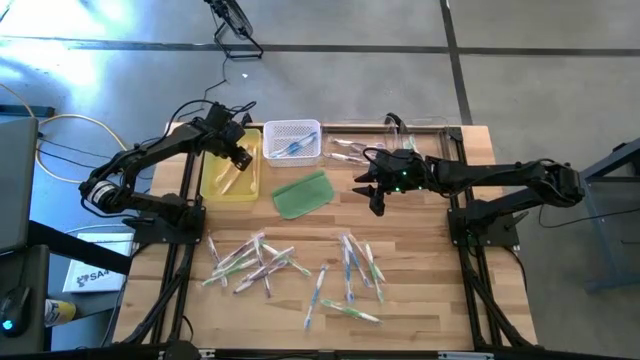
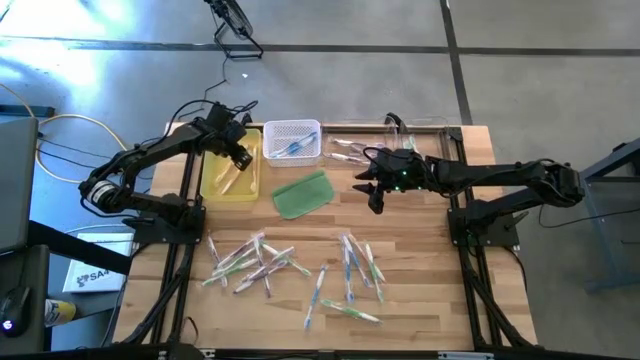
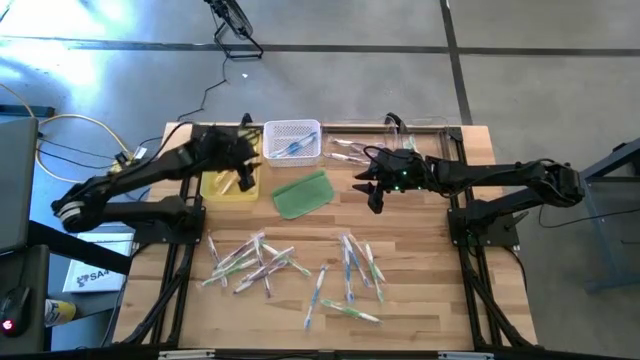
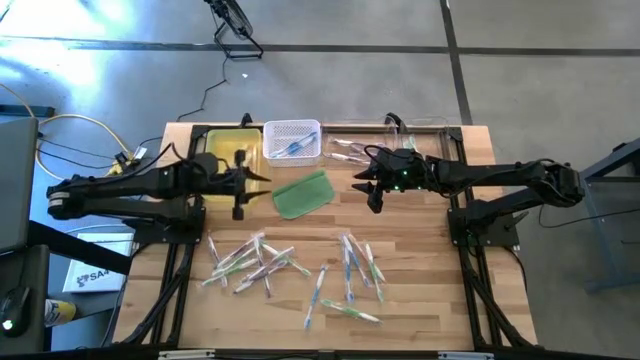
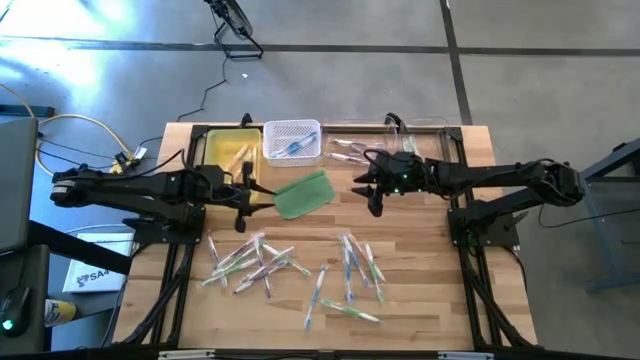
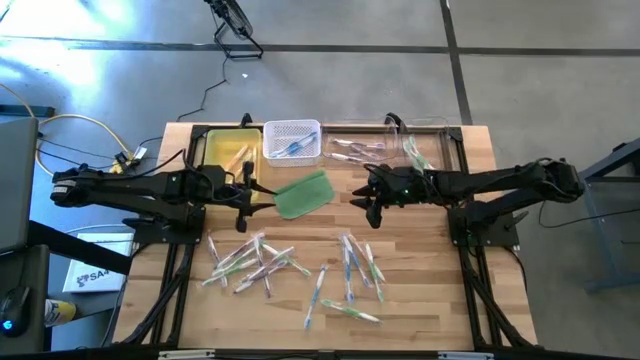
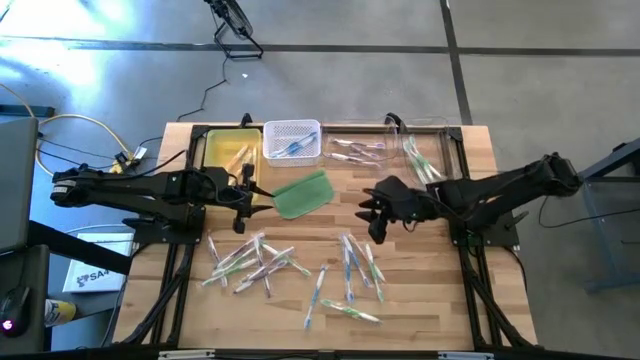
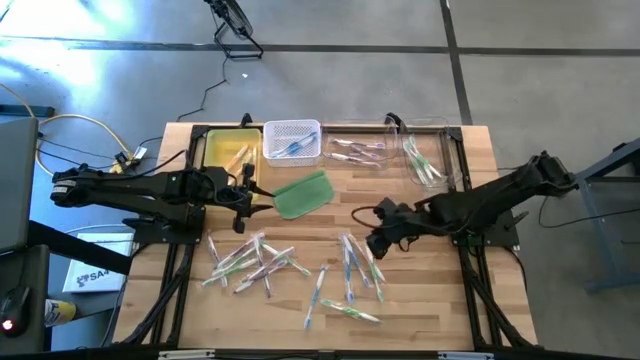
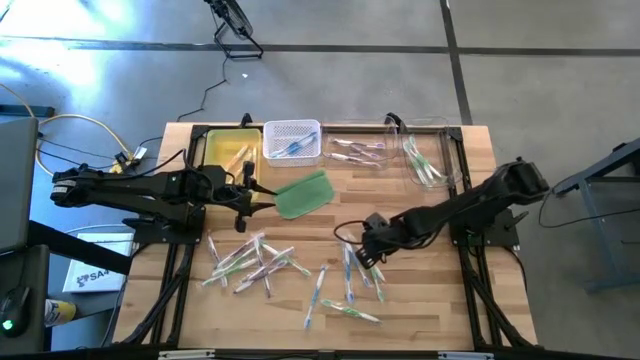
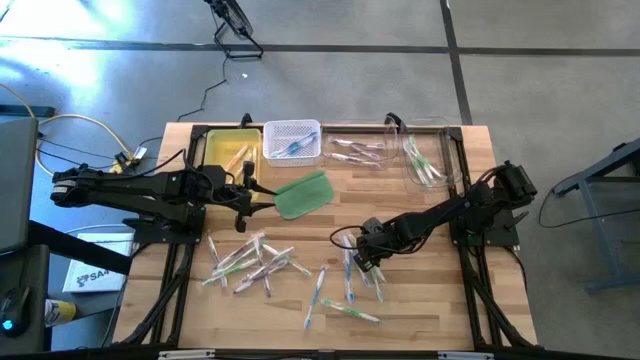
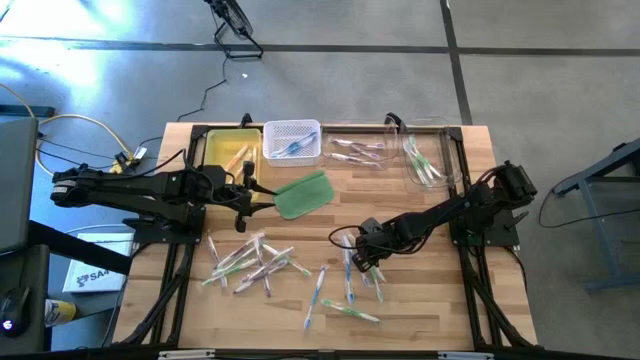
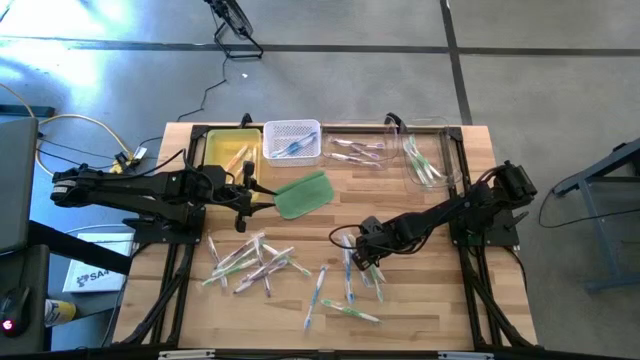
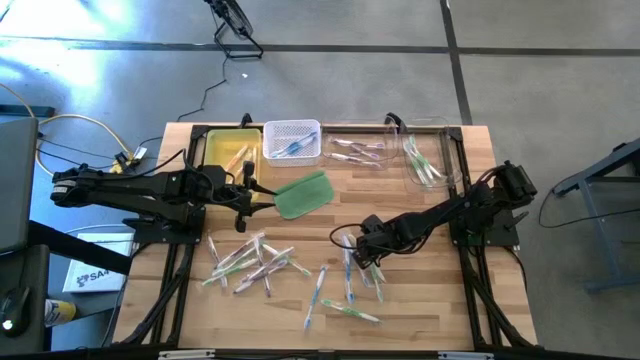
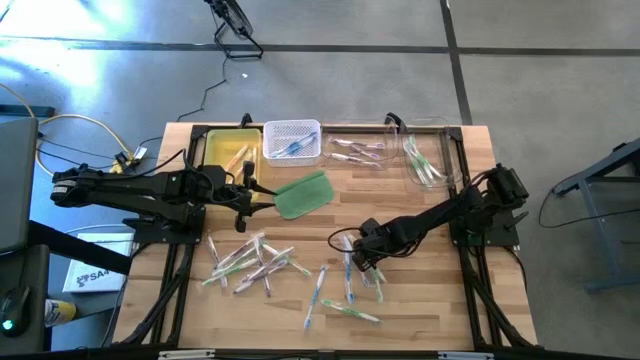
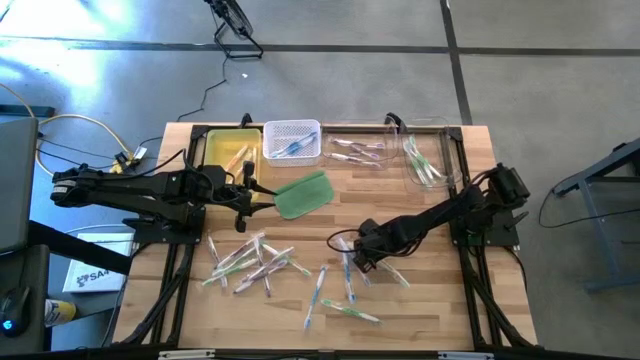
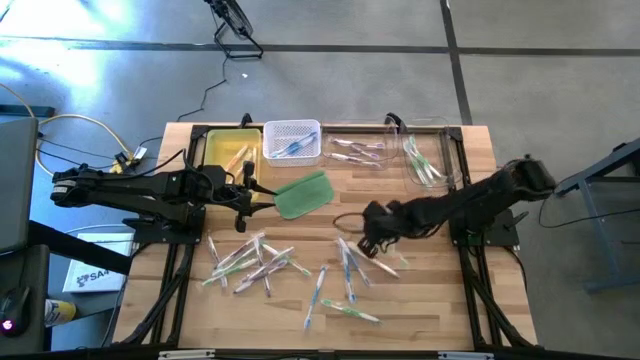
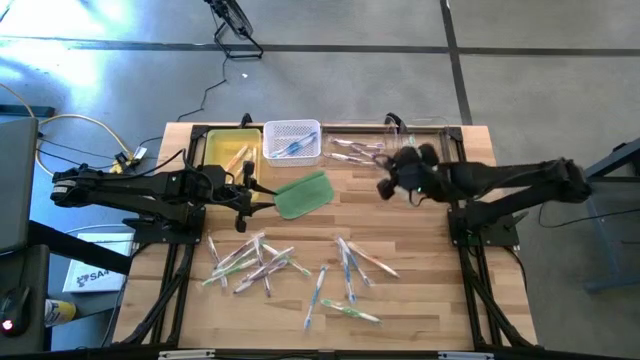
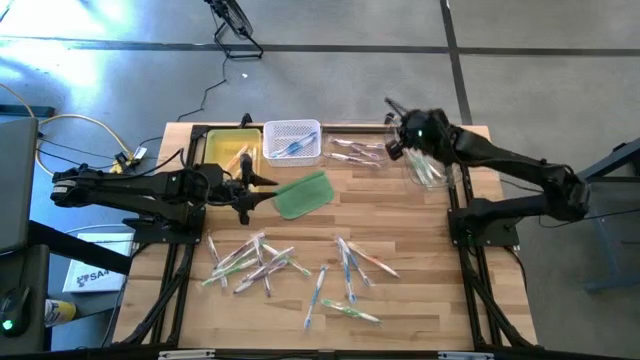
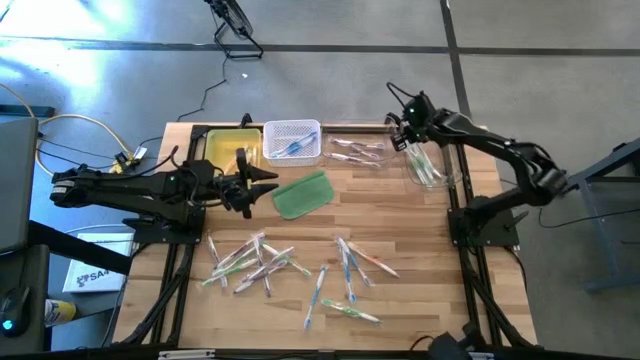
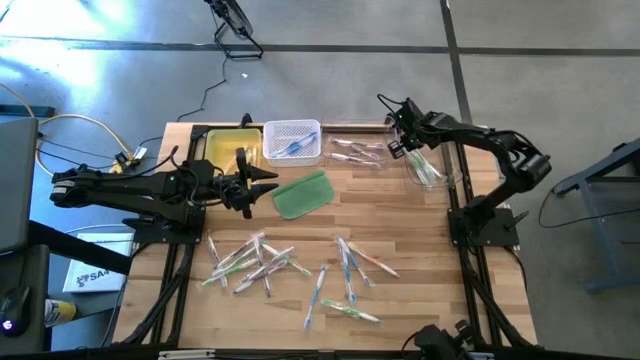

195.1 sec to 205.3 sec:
Task: Pick & Place Toothbrushes
Put the green toothbrush into the right transparent bin

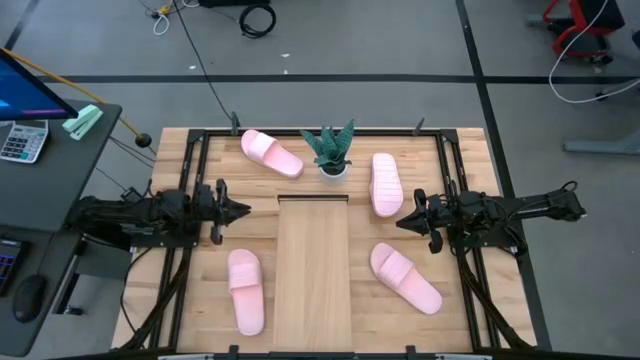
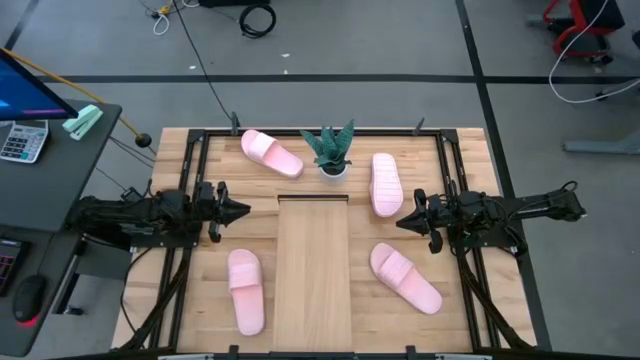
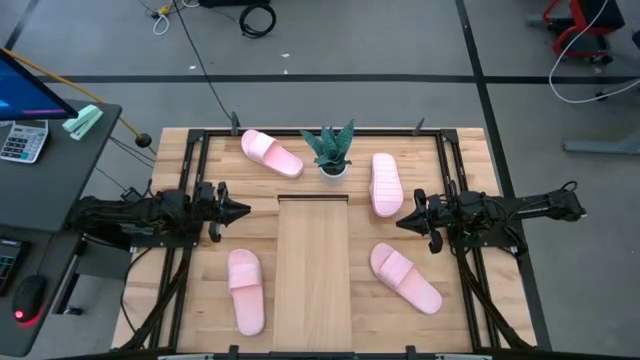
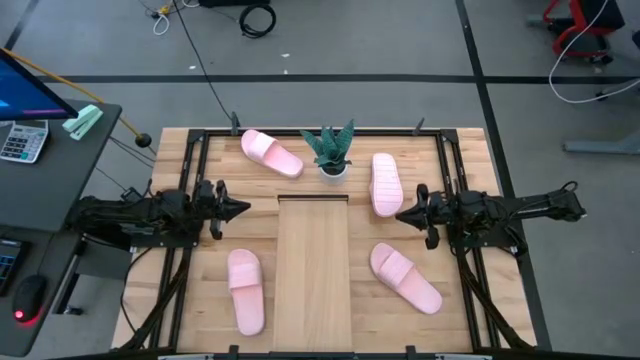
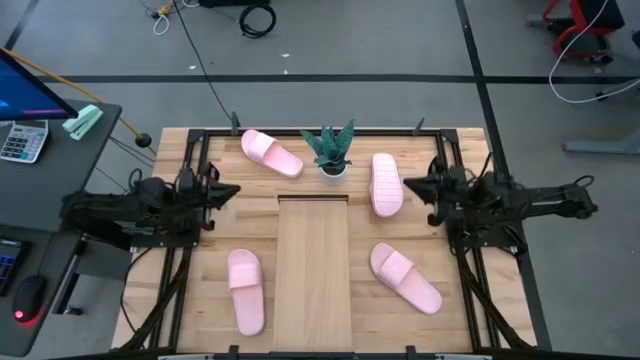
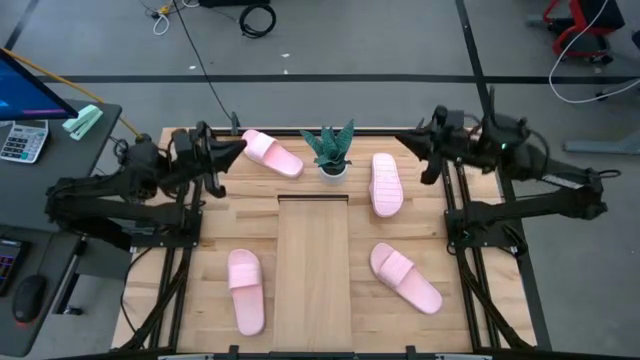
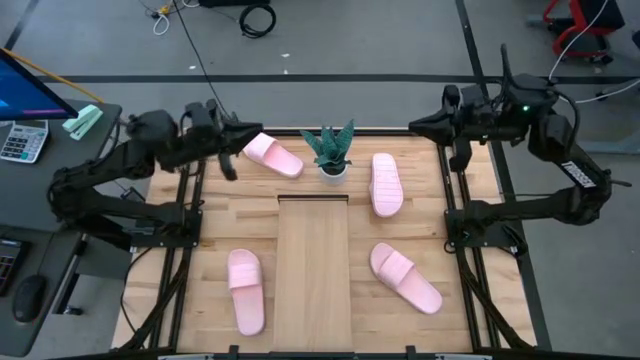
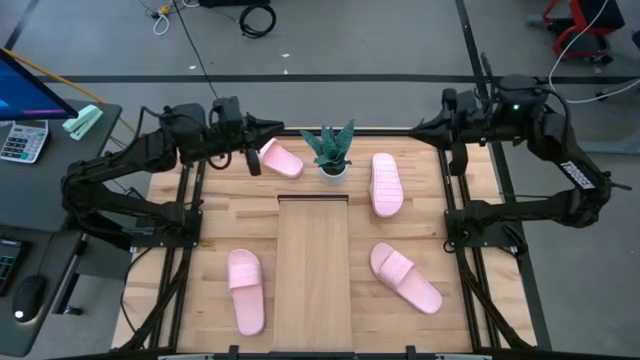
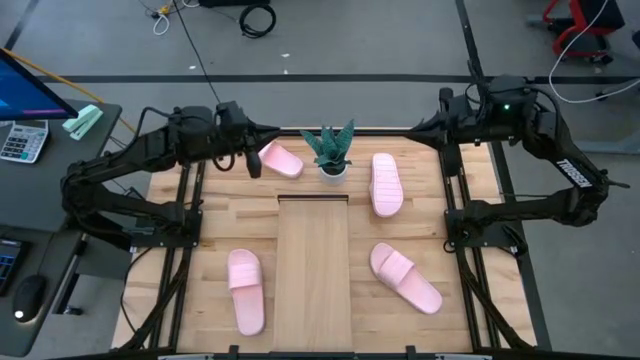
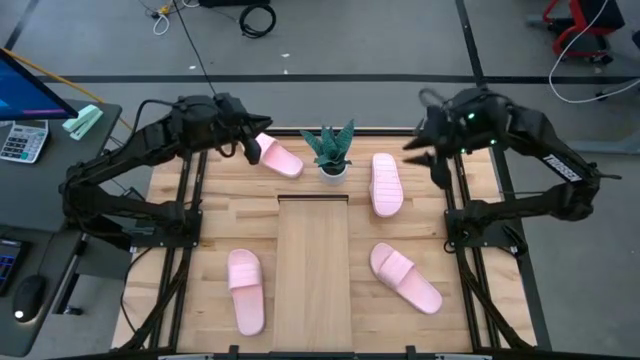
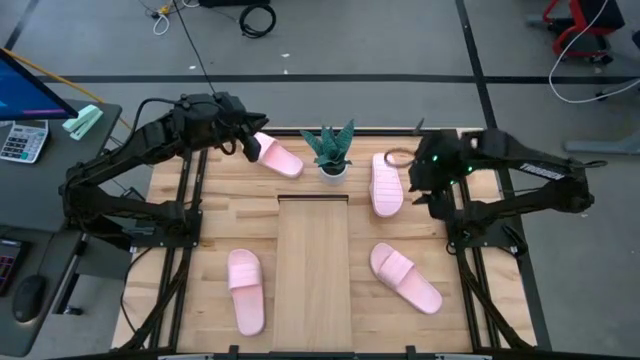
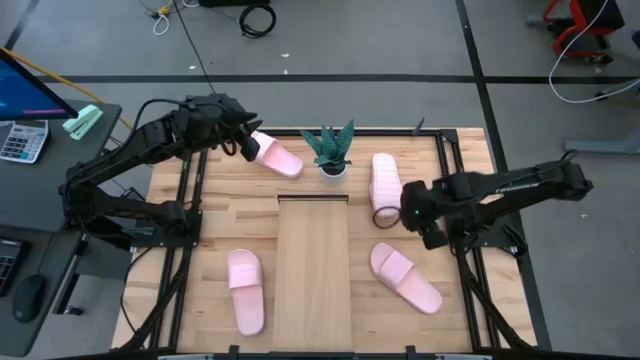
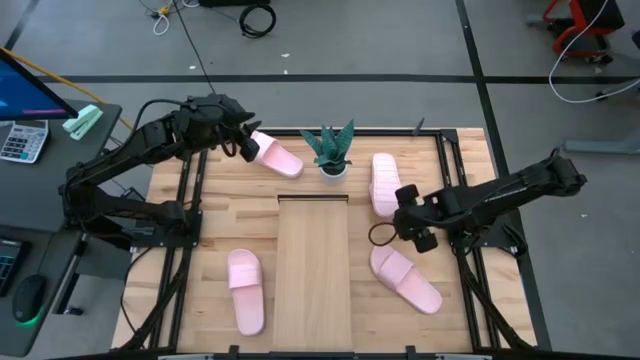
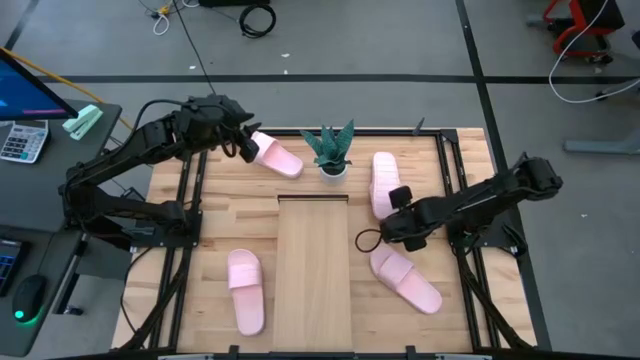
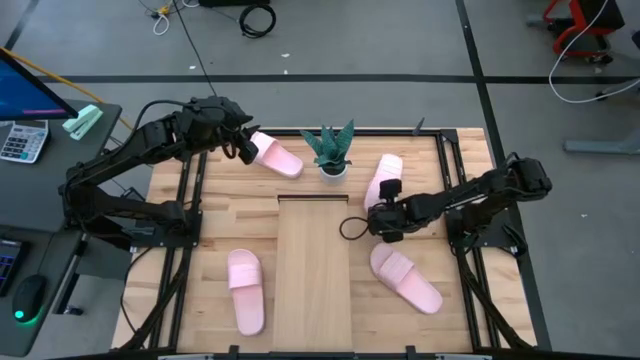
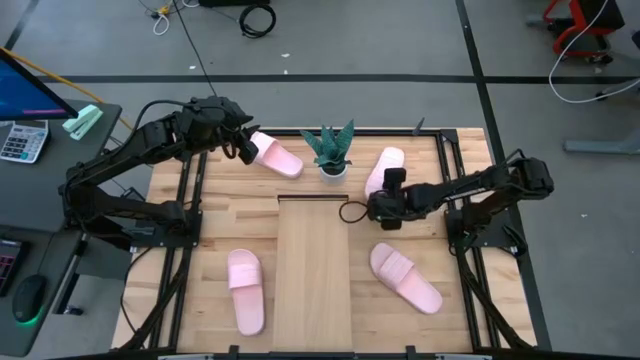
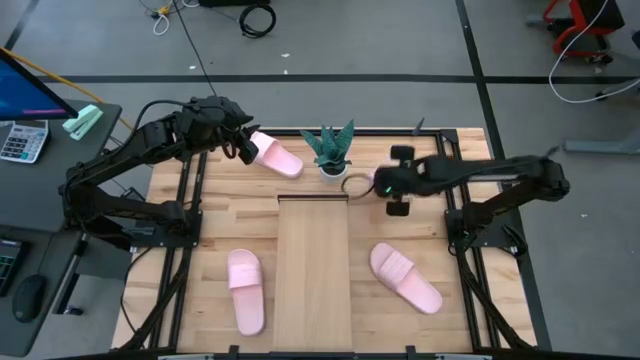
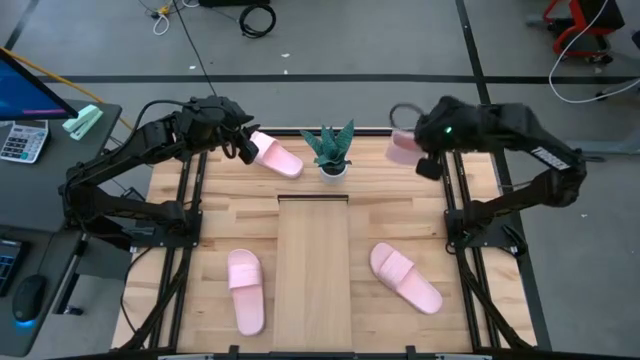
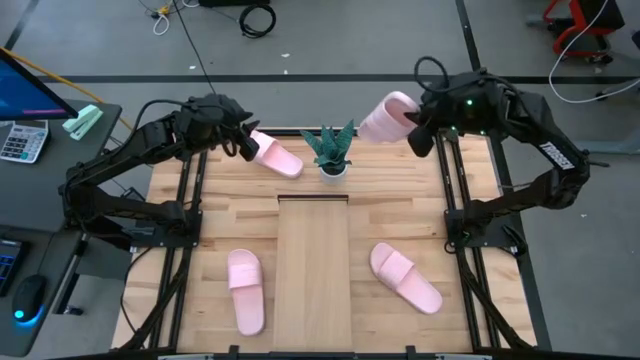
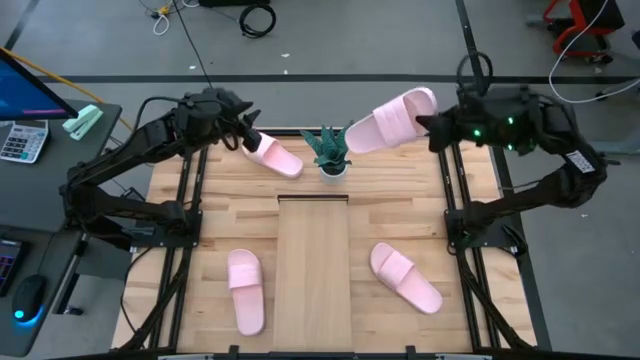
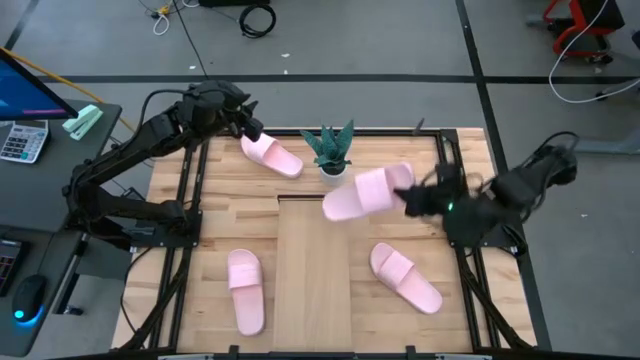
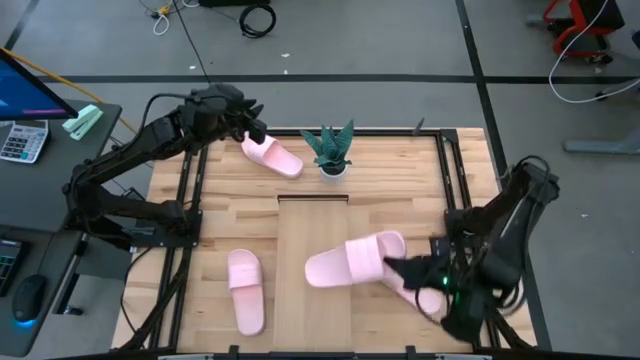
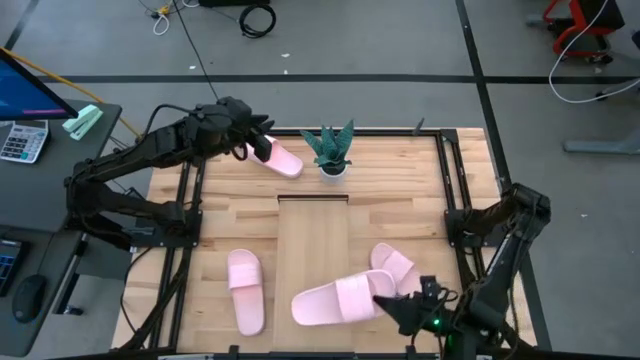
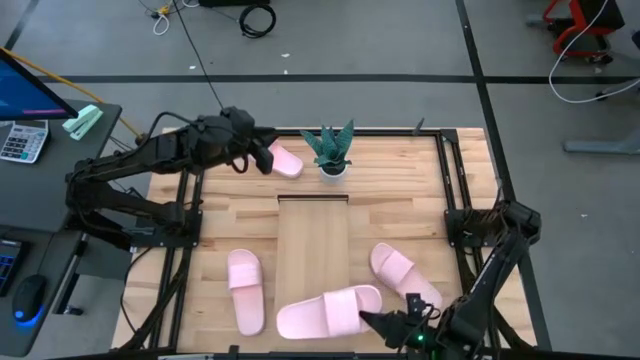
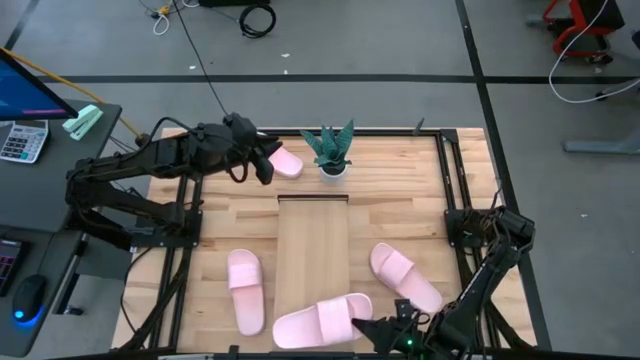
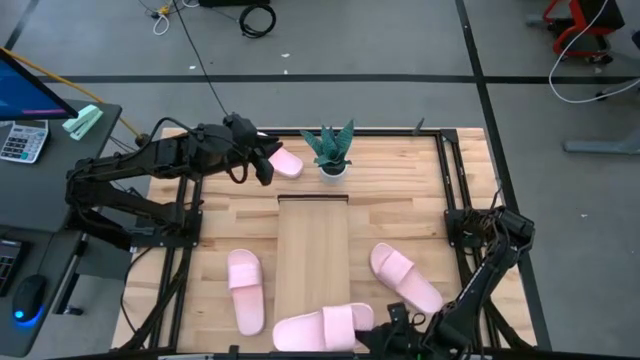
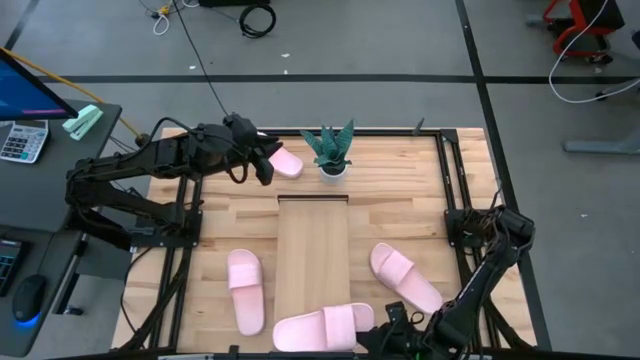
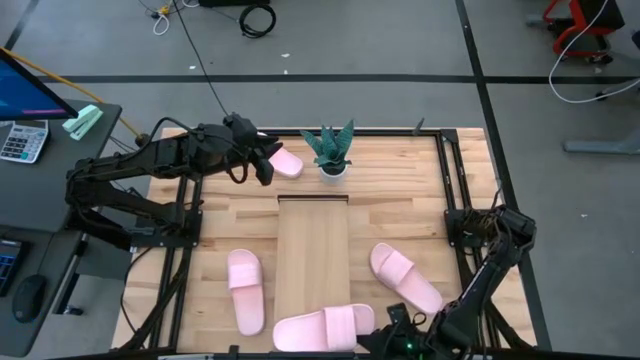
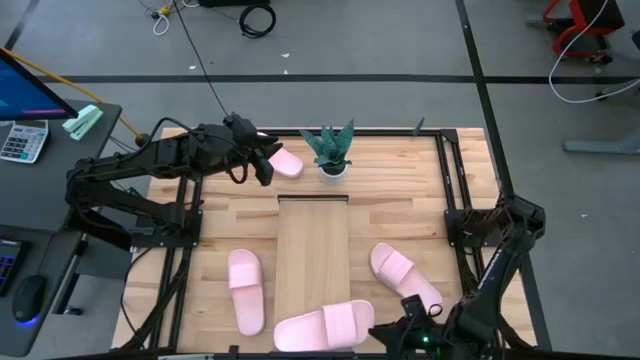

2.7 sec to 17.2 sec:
Task: Pick and place slides into the shelf
Put the top right pink slide on the shelf
